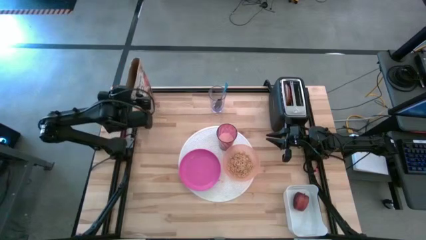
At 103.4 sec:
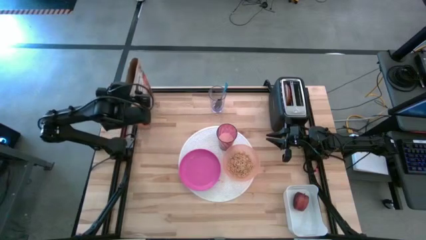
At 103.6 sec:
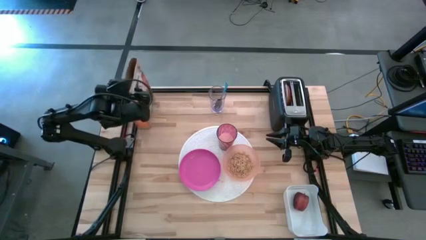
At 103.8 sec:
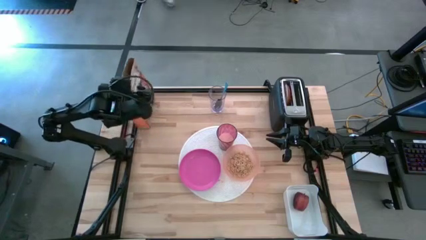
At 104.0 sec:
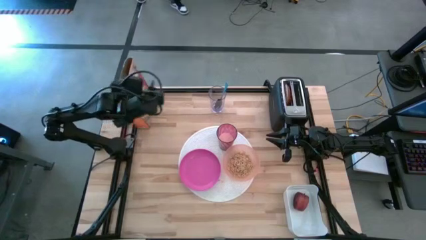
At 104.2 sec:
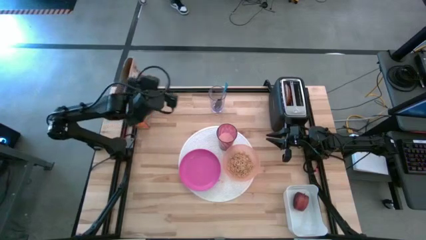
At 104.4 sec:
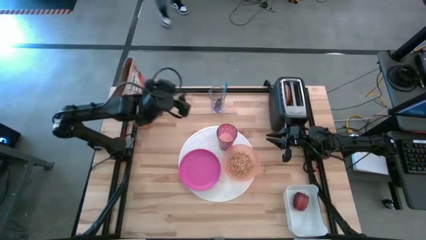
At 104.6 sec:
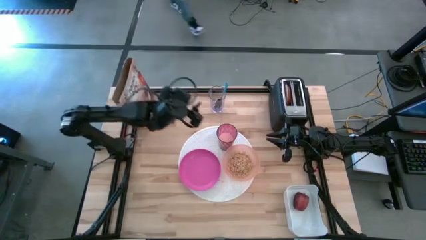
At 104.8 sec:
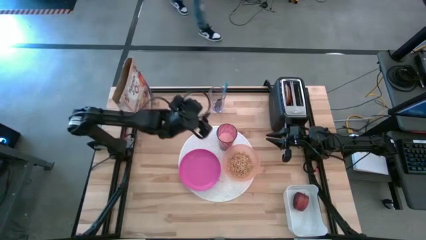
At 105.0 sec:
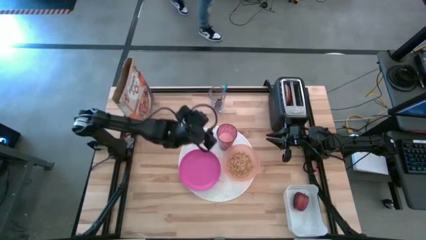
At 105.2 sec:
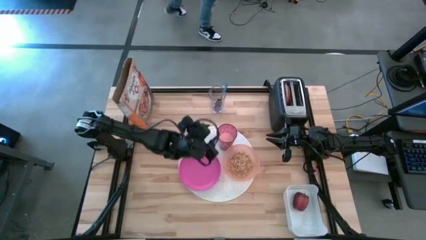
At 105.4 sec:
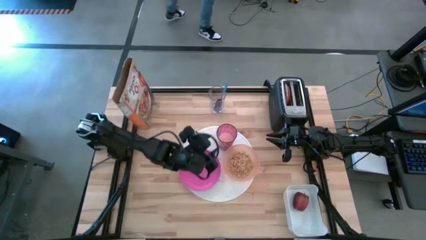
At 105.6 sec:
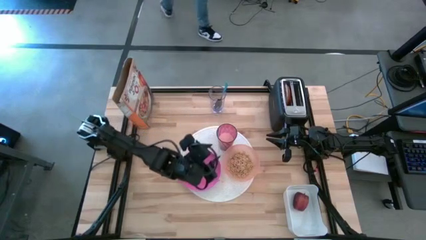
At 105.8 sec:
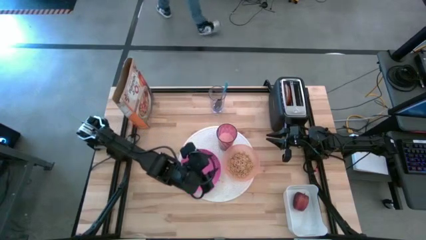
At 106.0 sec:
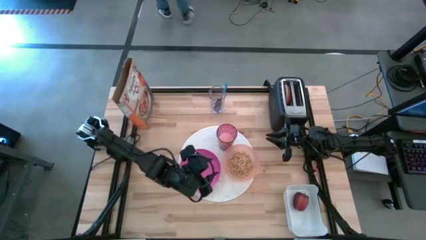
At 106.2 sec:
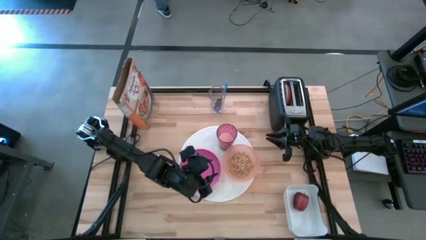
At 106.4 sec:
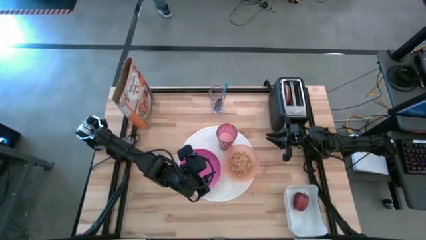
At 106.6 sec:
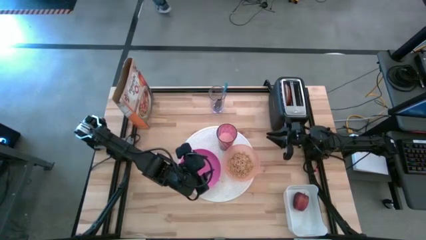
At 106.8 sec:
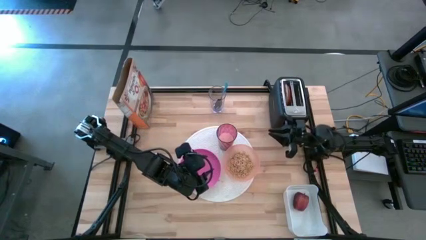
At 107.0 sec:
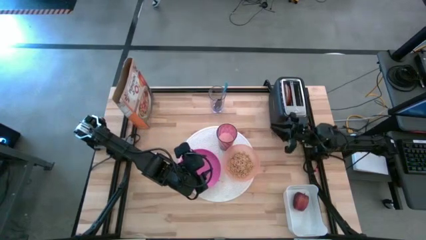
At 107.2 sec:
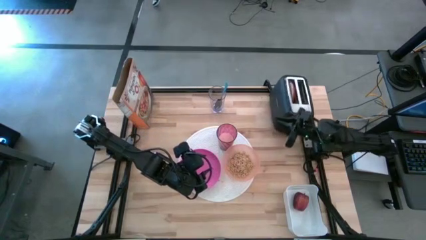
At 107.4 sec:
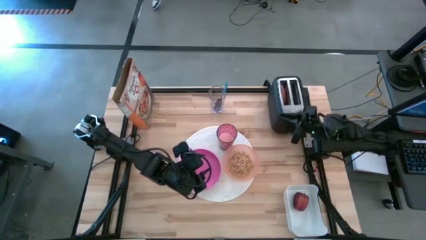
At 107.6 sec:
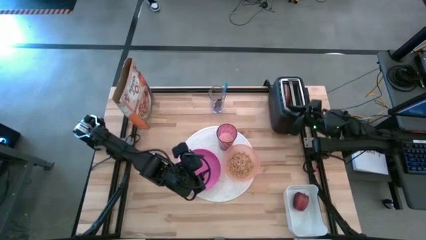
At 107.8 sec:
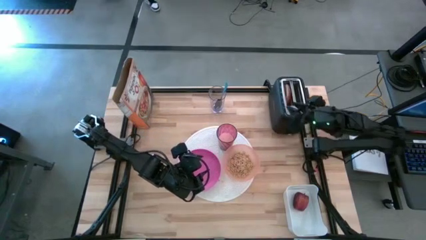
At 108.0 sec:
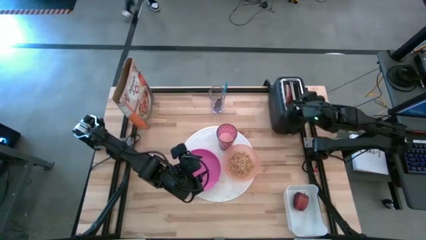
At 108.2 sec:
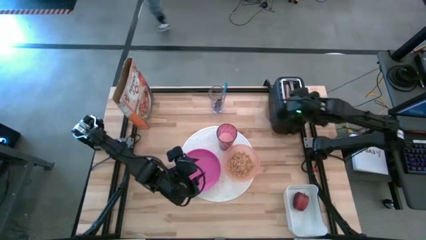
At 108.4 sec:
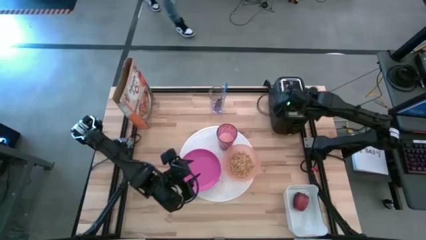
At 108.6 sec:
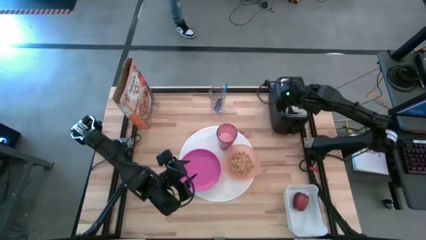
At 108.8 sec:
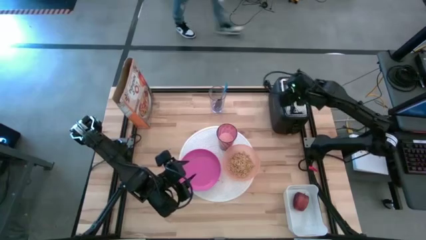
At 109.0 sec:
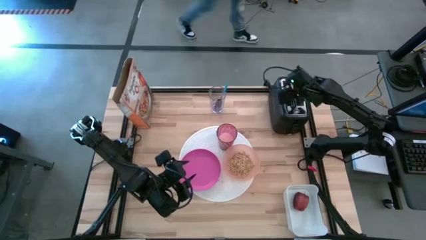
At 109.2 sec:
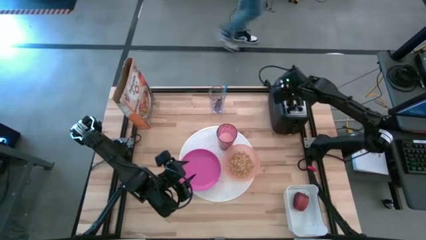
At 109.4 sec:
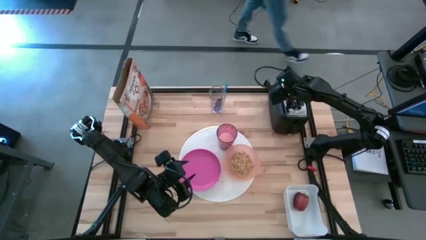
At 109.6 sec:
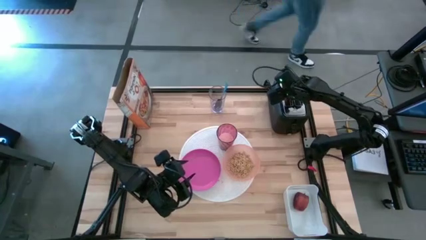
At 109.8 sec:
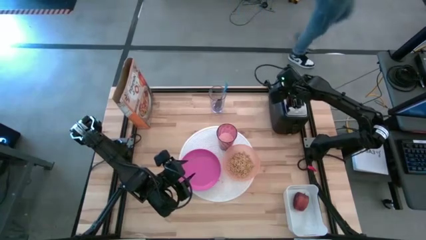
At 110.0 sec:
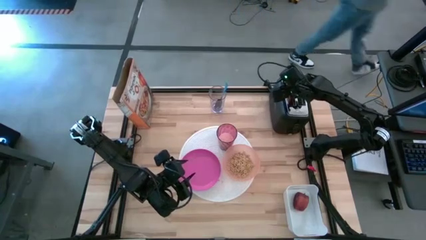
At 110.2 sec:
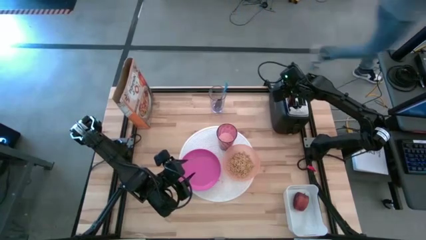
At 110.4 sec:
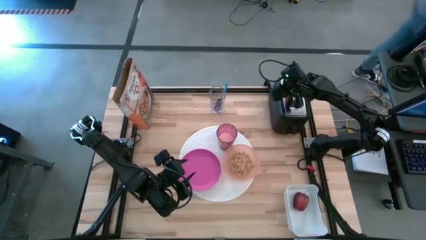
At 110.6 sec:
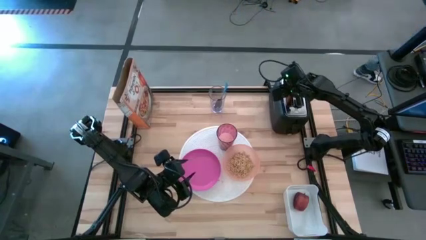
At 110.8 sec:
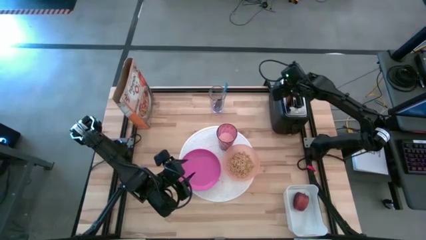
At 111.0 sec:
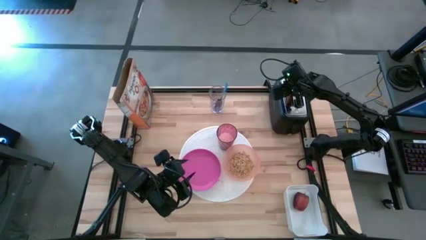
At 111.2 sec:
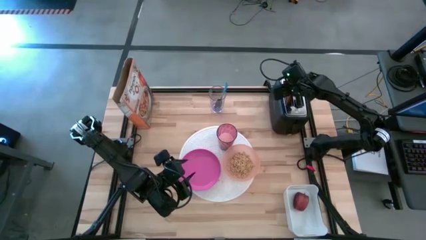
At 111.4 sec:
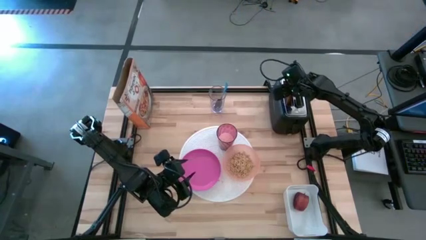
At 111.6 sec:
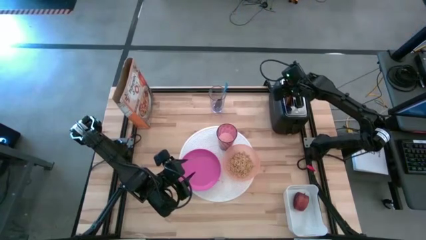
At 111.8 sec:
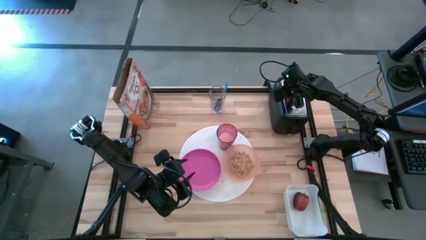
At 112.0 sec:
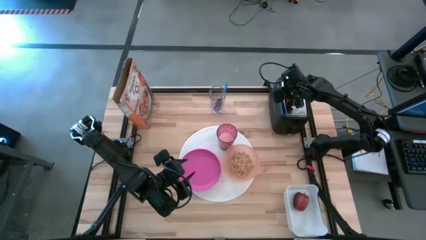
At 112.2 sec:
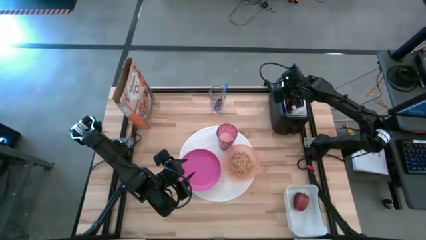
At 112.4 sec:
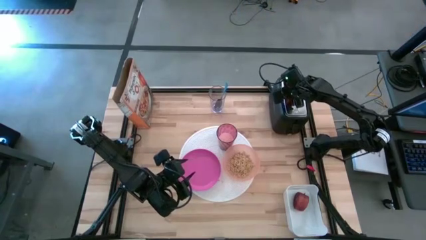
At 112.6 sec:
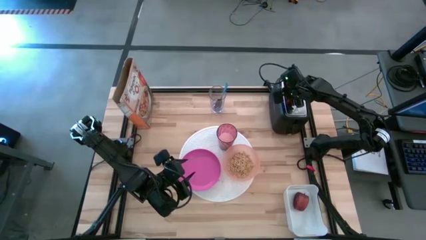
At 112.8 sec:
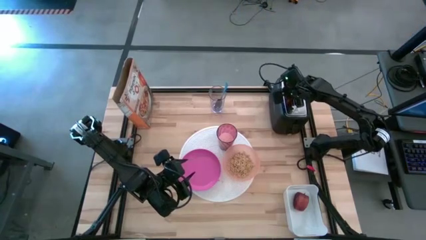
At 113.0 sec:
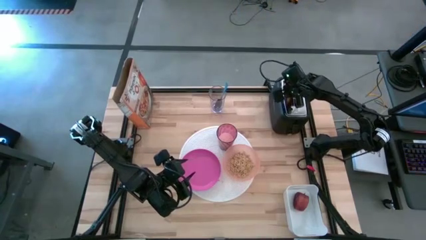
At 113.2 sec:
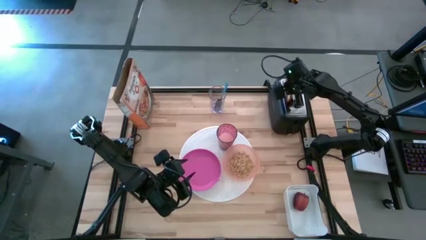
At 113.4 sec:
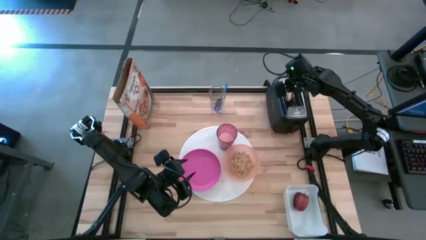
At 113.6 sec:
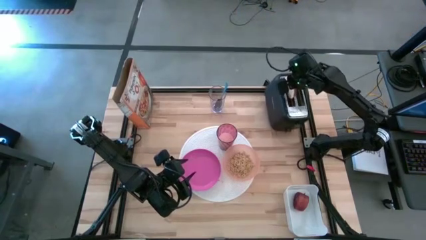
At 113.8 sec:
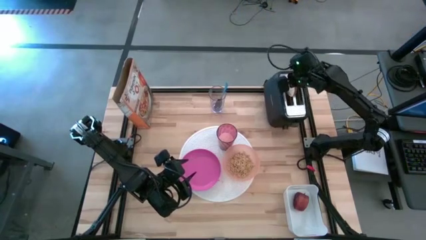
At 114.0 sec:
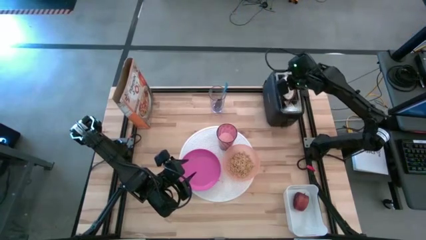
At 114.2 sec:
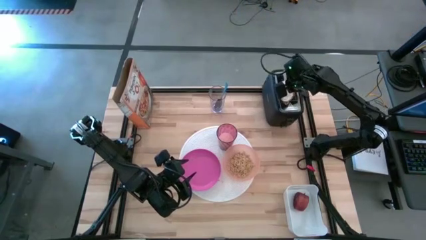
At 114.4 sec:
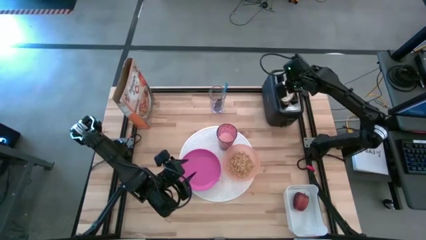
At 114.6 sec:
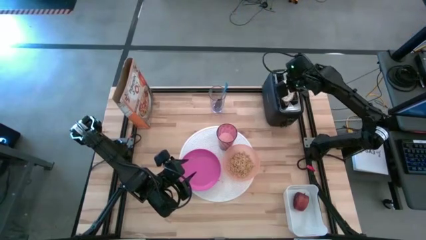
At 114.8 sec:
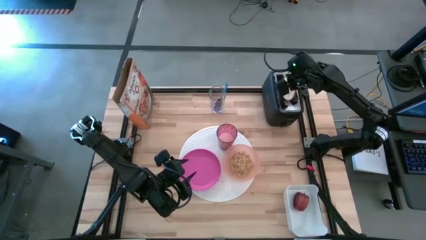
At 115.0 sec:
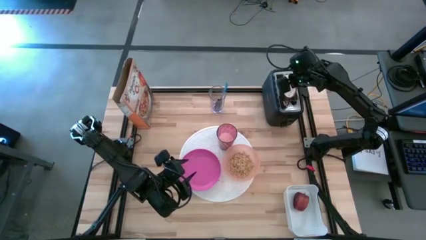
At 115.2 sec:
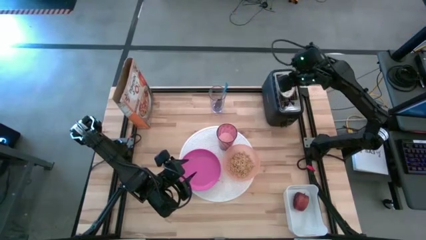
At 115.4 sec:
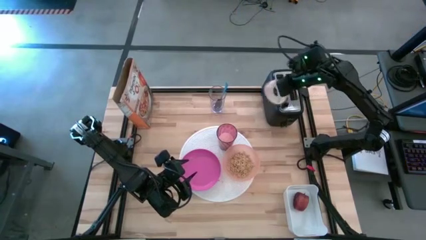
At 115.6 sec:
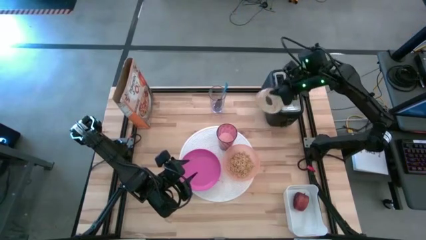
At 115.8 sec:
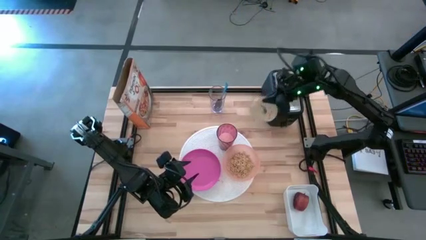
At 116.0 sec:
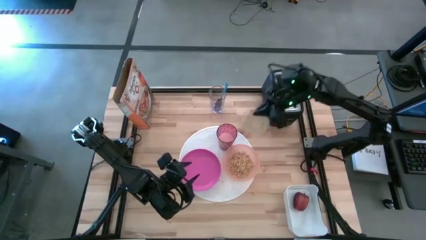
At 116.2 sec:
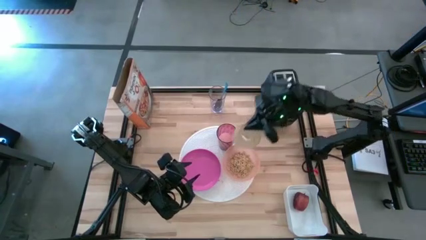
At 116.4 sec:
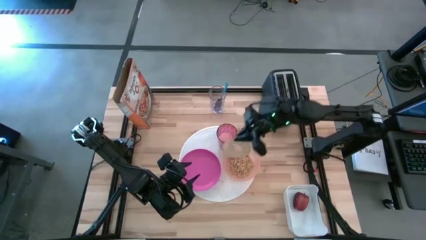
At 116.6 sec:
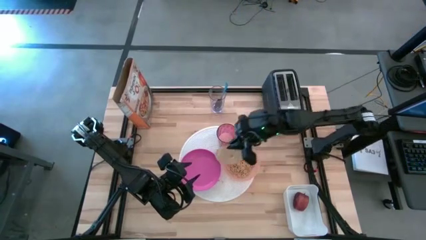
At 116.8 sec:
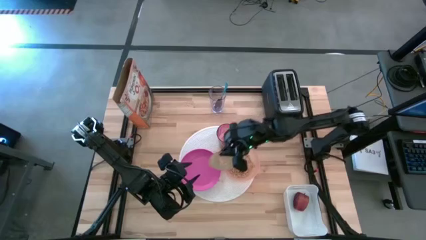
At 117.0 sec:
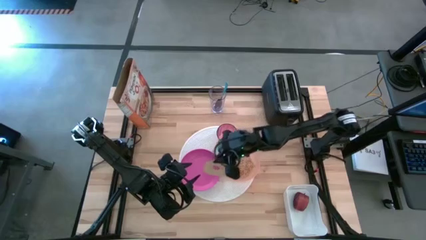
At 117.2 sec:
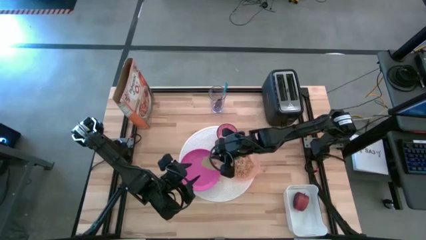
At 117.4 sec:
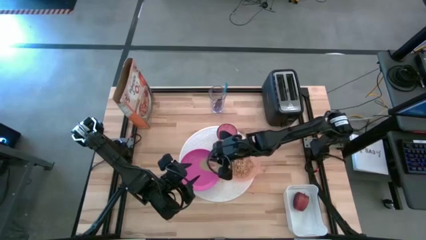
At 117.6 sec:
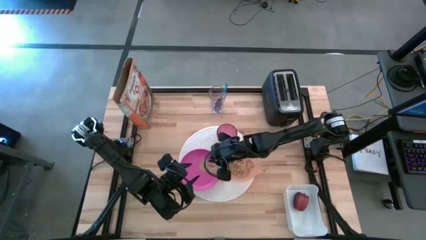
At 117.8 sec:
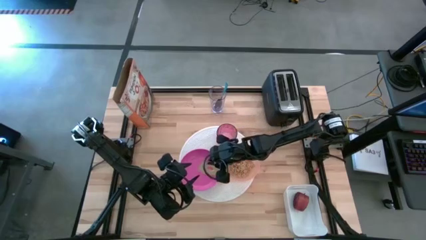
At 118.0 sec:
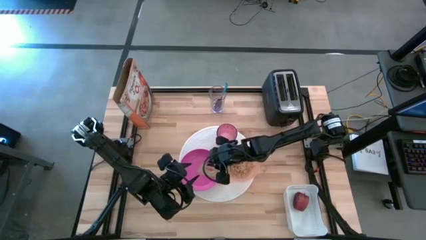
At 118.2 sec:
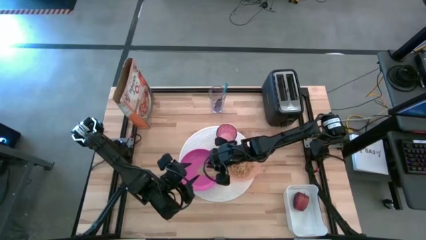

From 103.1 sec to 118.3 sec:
Task: Arrange a breakfast setting
Put the toasted bread on the pink plate
